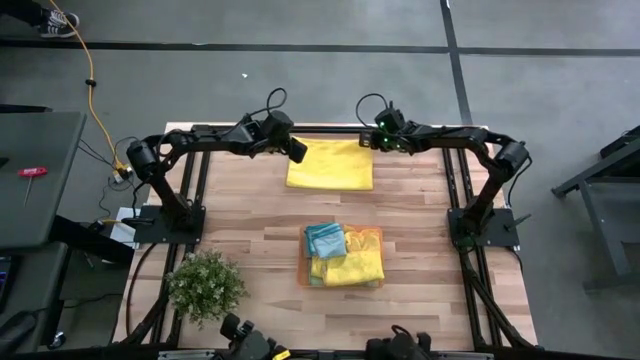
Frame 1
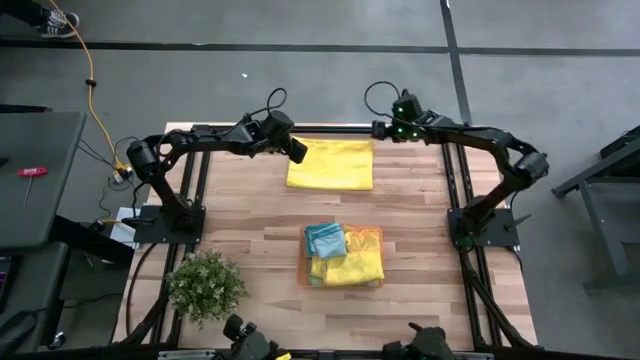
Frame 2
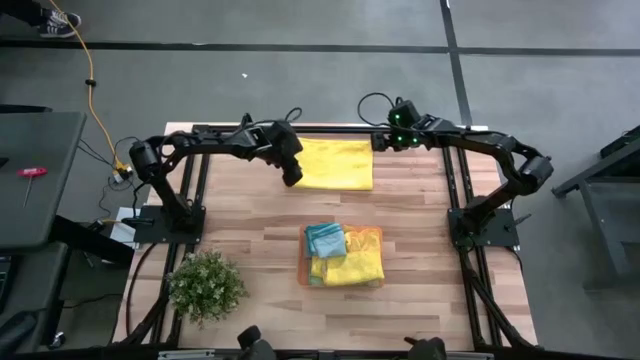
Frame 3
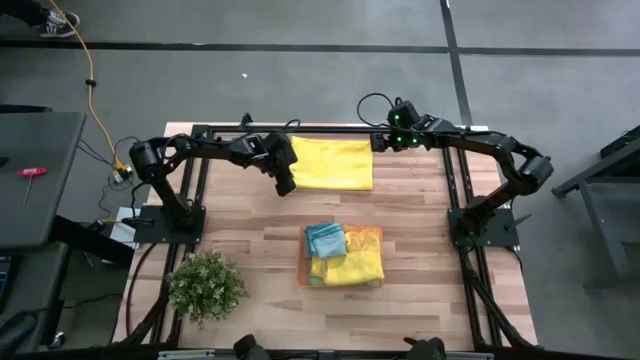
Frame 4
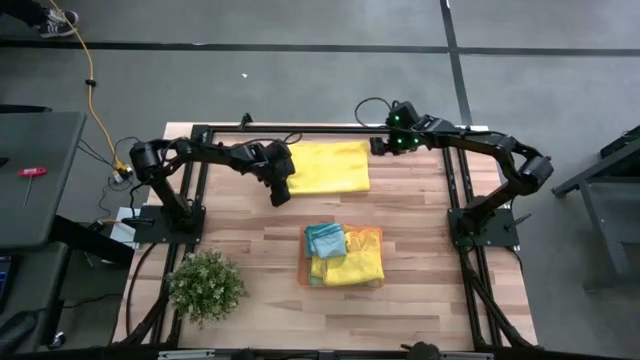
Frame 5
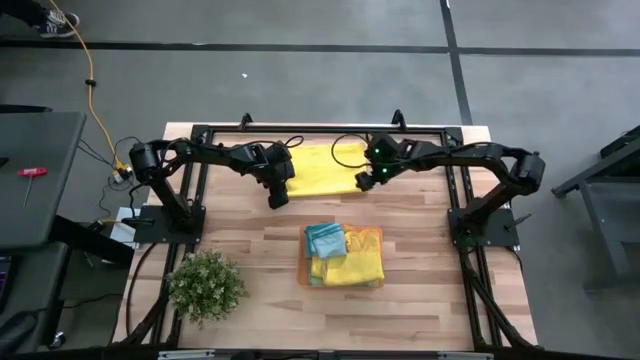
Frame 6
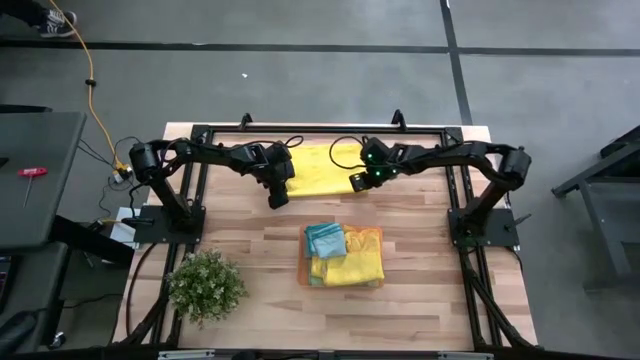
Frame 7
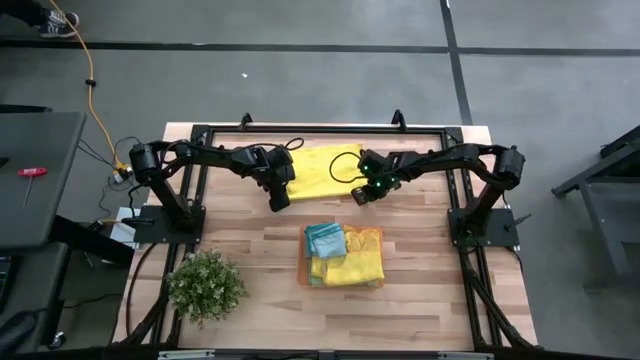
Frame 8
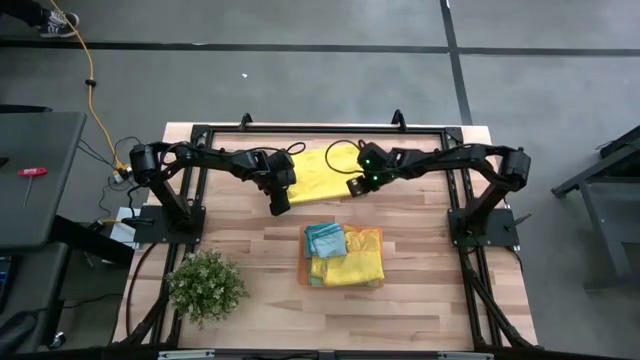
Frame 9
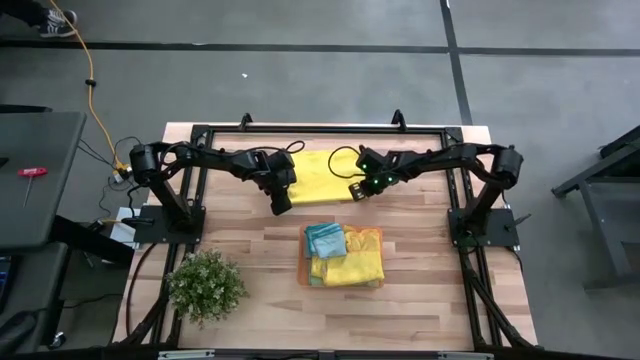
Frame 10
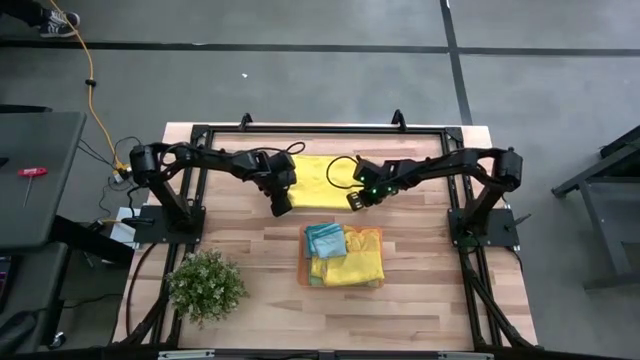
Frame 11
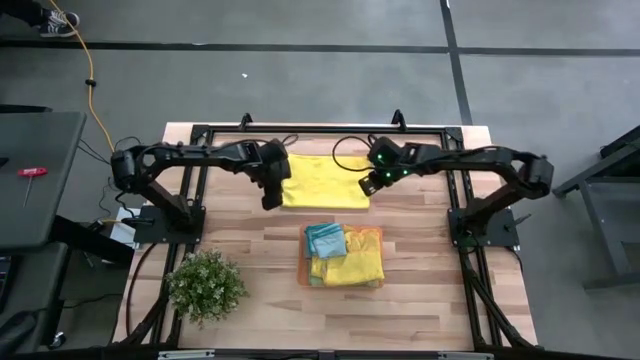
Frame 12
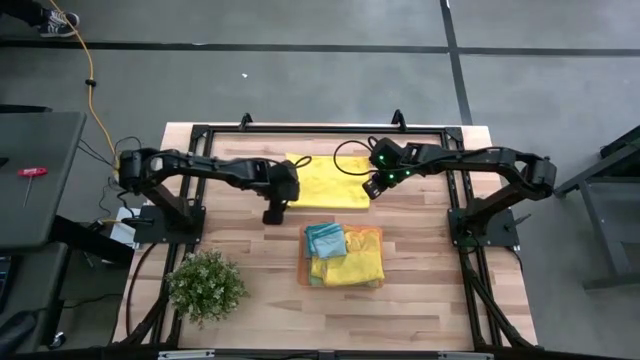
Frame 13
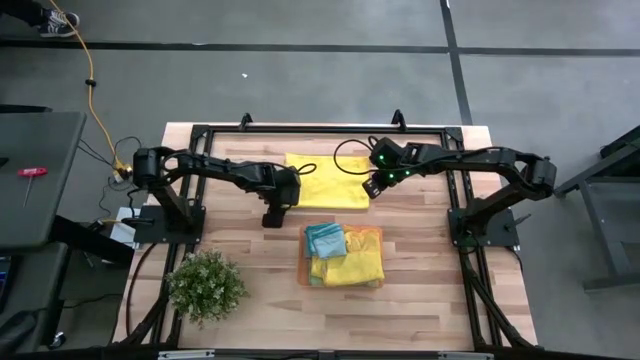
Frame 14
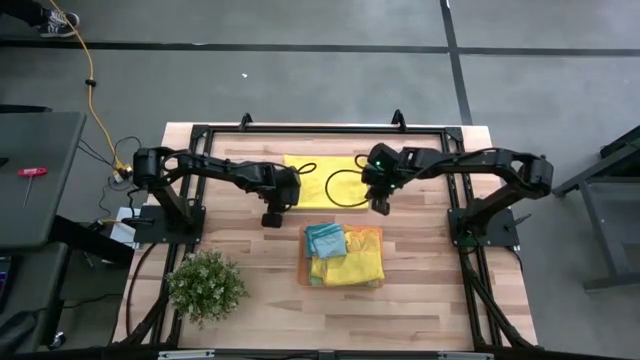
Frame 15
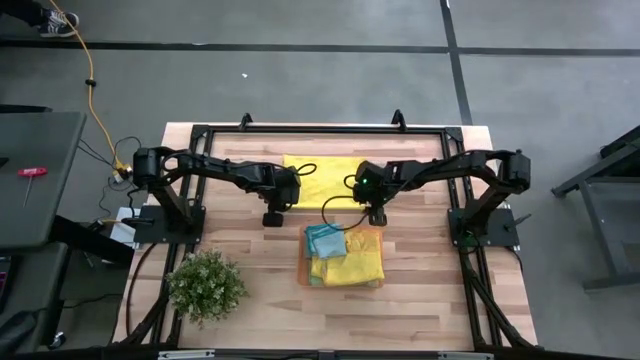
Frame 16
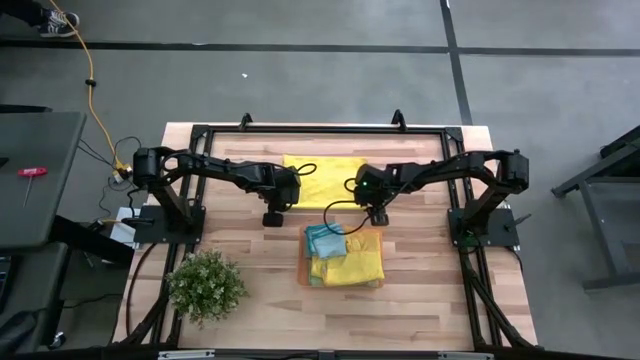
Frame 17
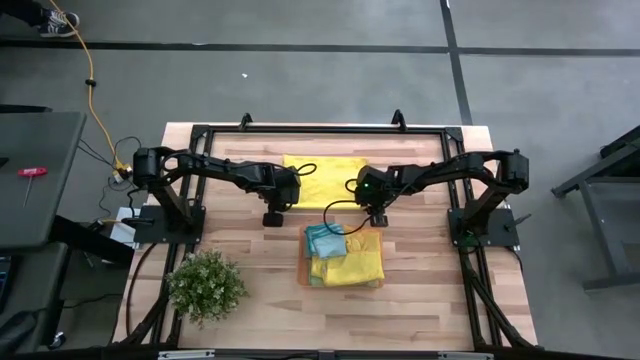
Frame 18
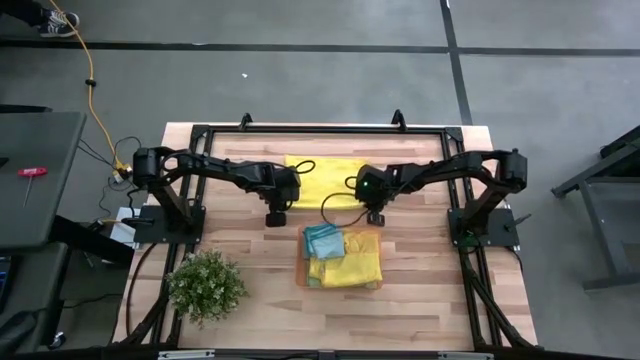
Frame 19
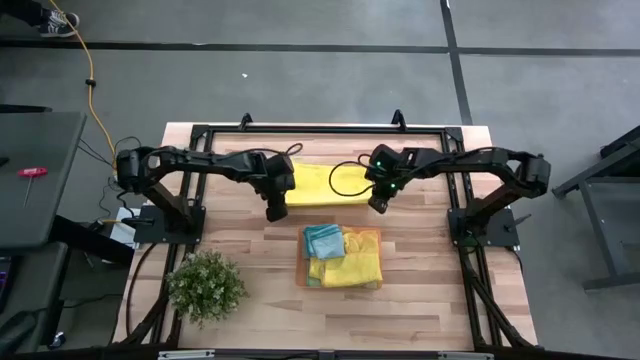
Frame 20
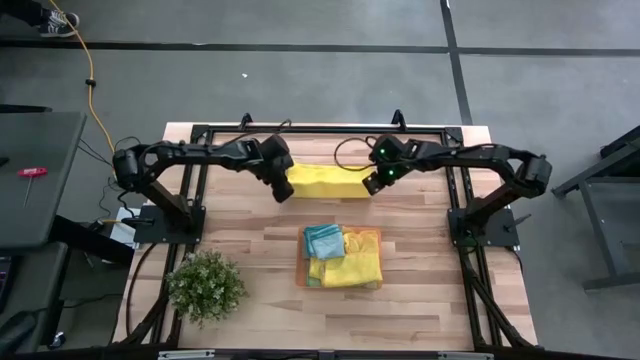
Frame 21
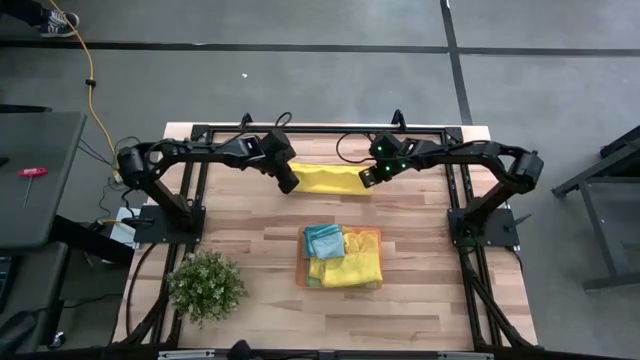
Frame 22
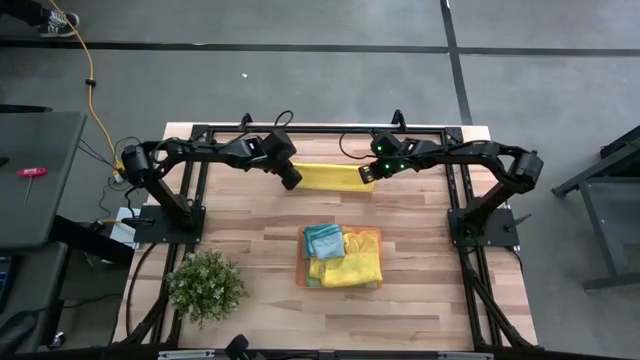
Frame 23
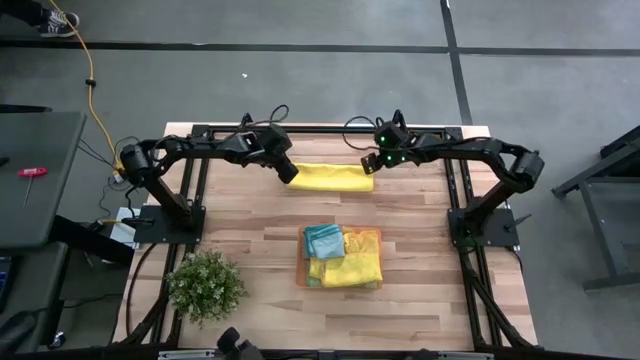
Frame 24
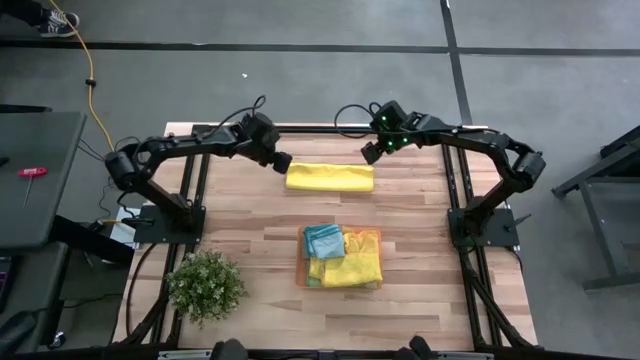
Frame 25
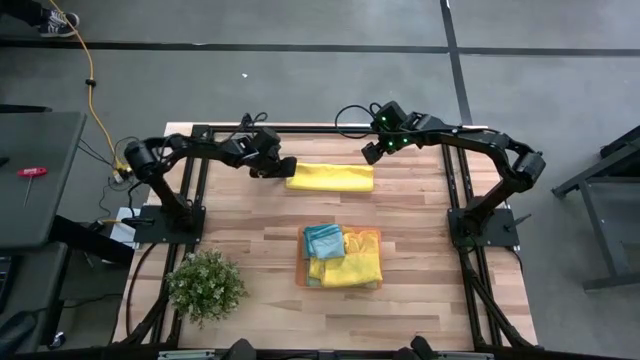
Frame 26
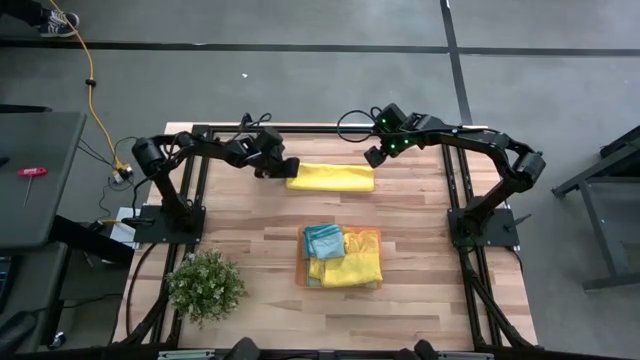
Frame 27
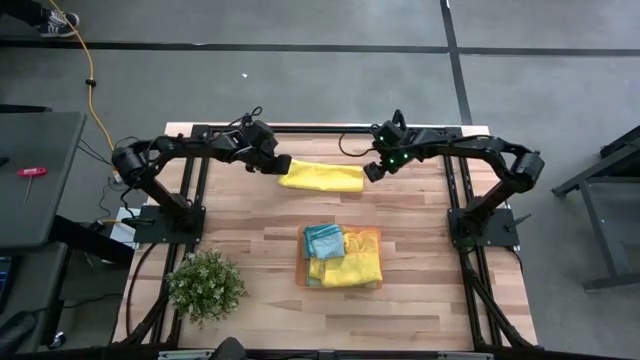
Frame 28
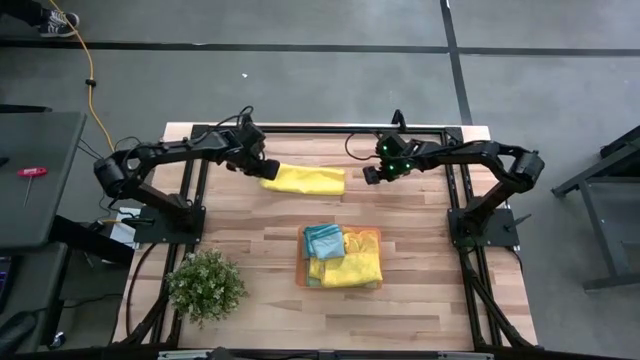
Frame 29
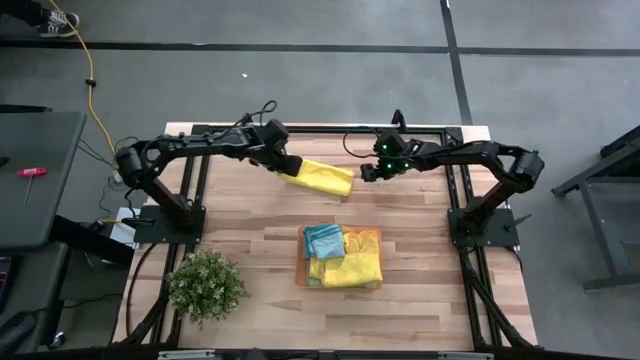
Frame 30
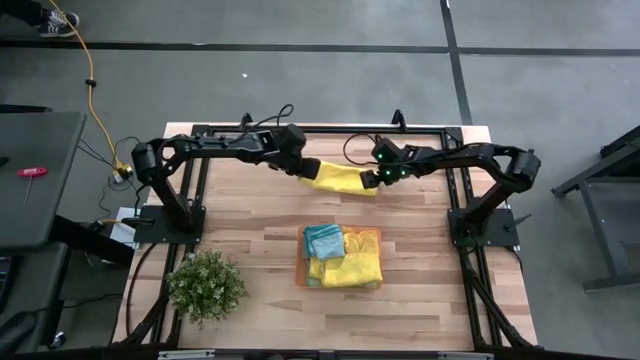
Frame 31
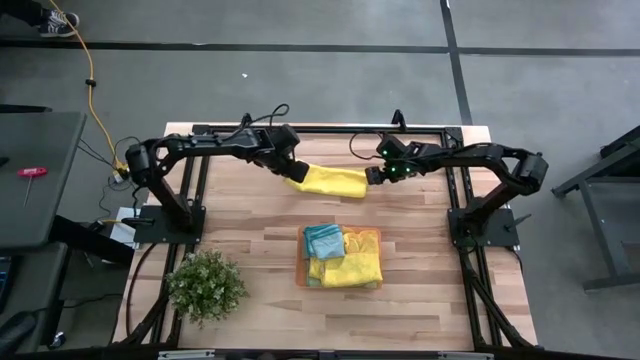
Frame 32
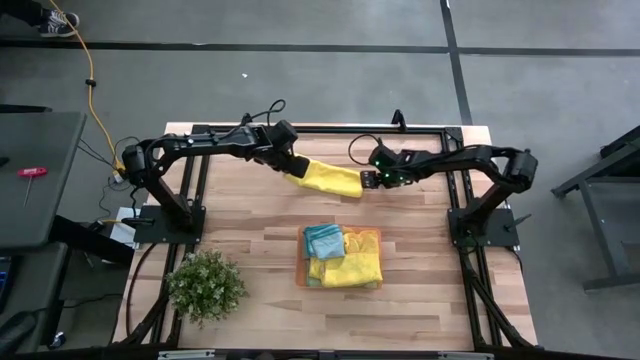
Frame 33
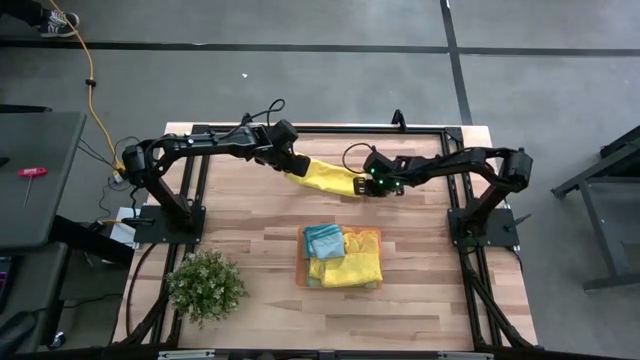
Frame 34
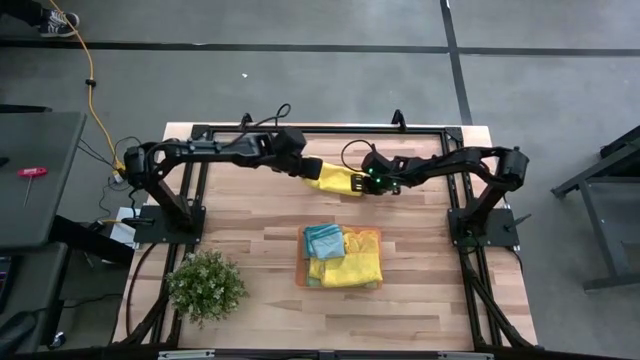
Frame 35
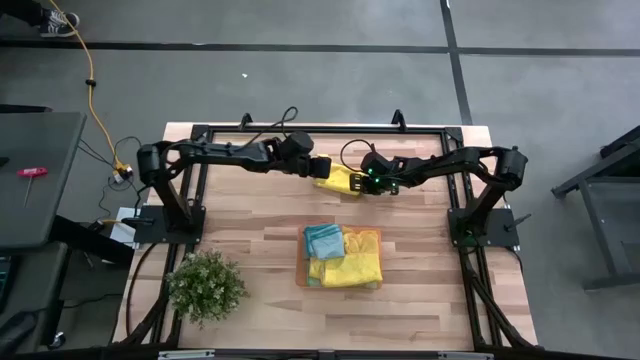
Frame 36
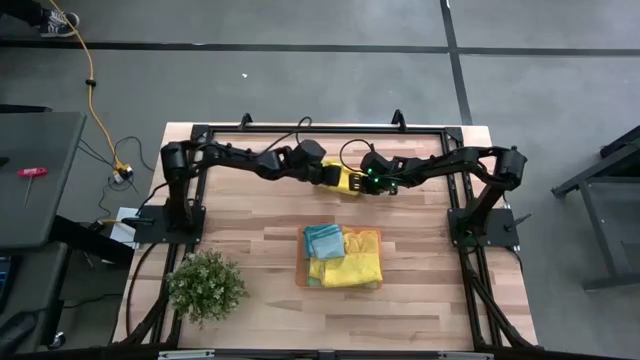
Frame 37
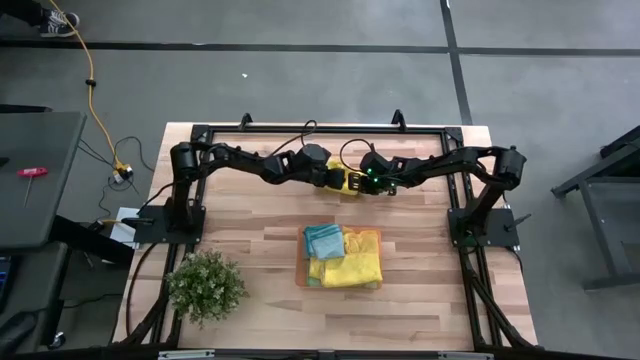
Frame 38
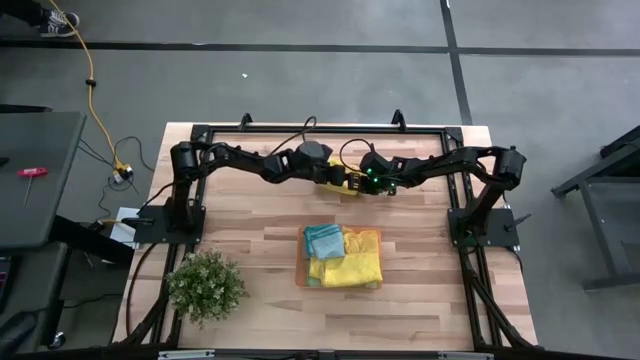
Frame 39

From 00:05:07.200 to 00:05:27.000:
Task: Fold microfiber towels
Fold the yellow microfiber towel
